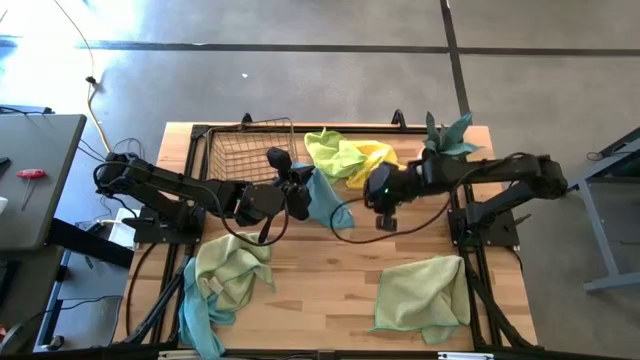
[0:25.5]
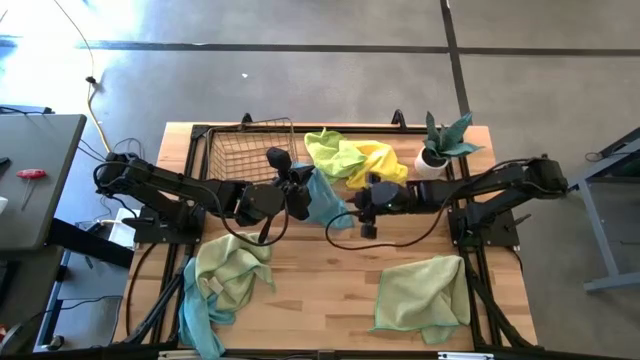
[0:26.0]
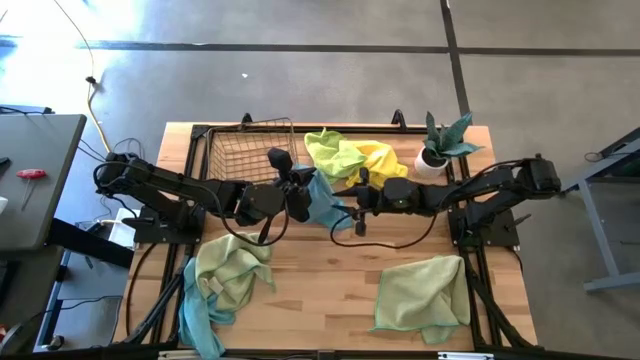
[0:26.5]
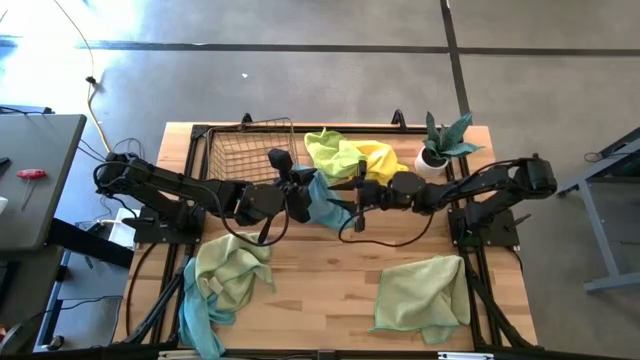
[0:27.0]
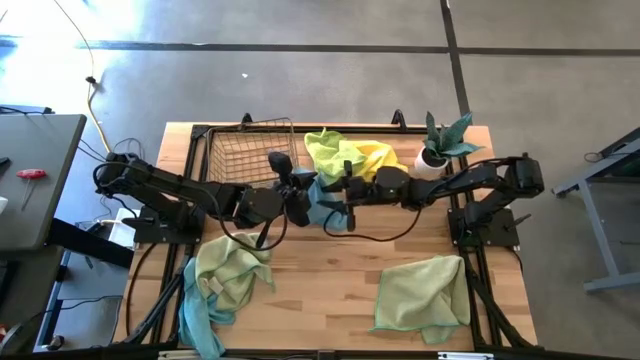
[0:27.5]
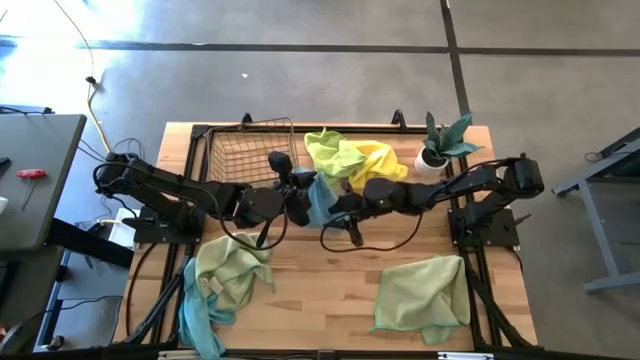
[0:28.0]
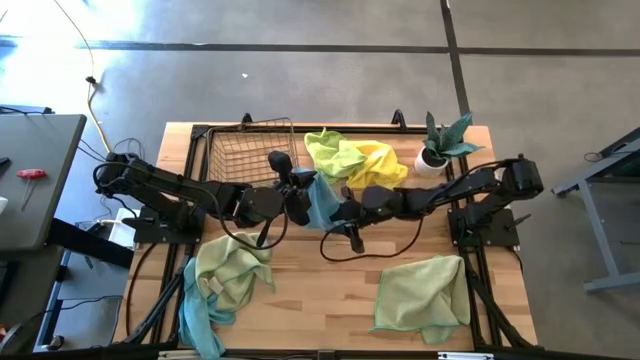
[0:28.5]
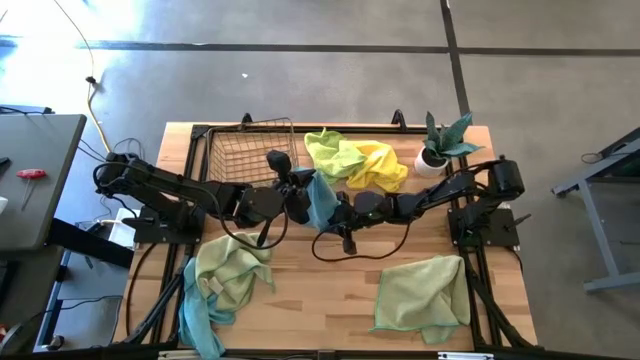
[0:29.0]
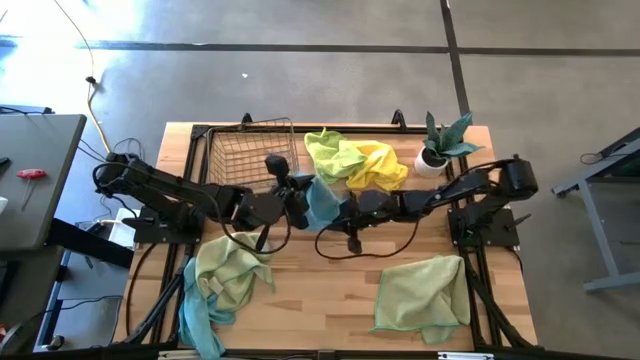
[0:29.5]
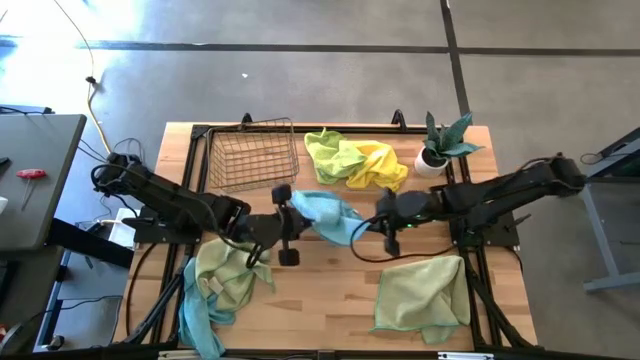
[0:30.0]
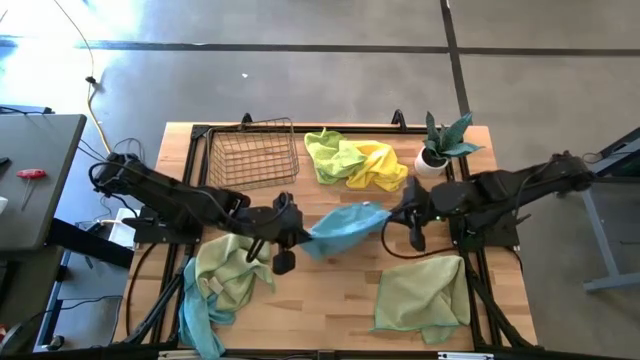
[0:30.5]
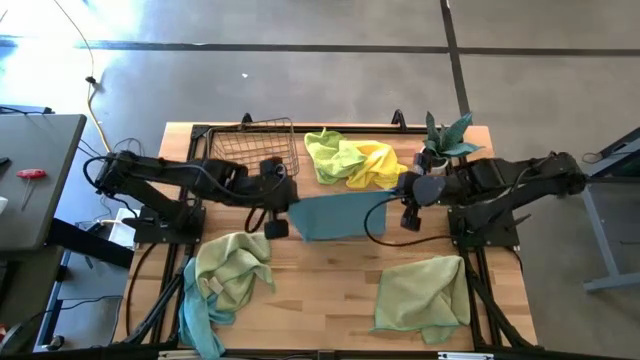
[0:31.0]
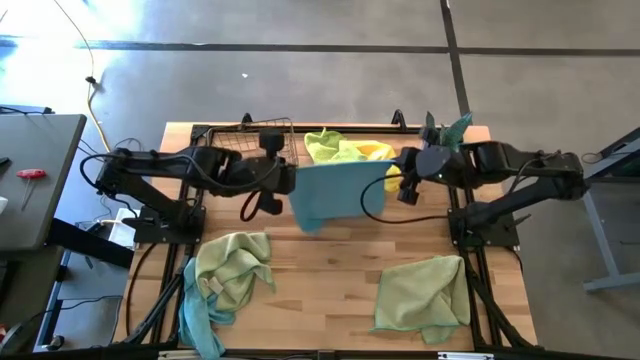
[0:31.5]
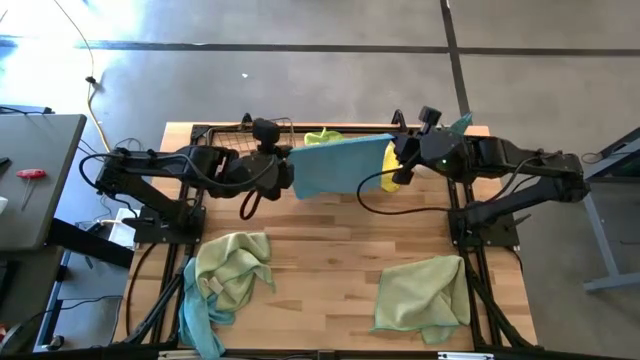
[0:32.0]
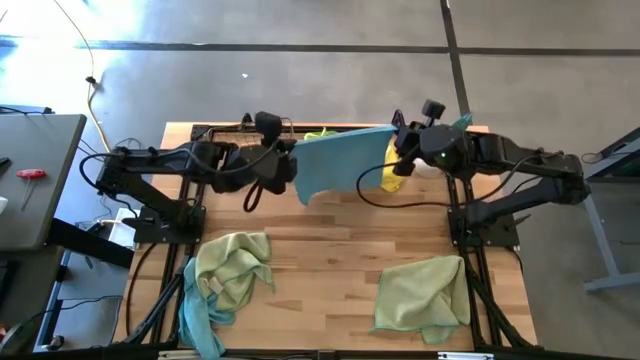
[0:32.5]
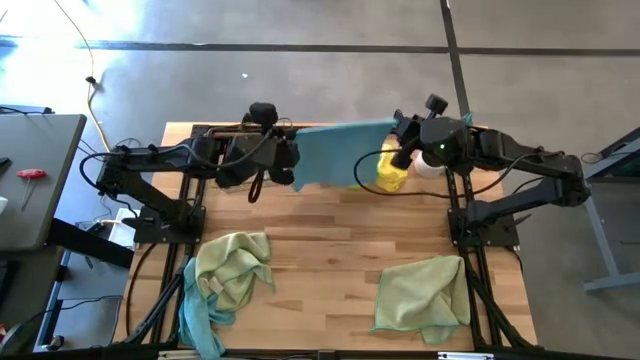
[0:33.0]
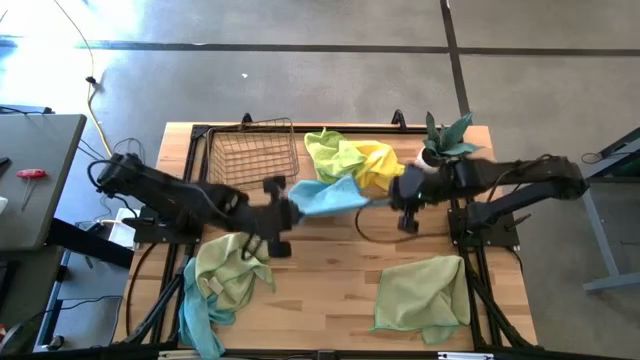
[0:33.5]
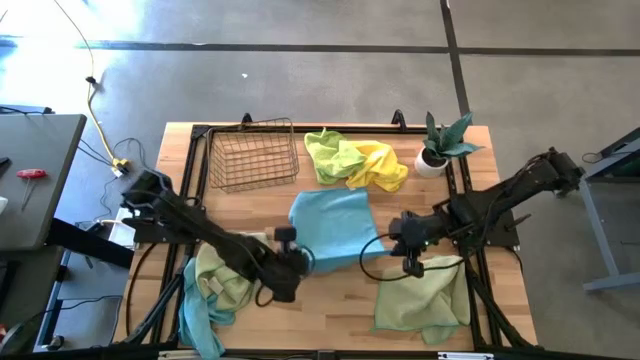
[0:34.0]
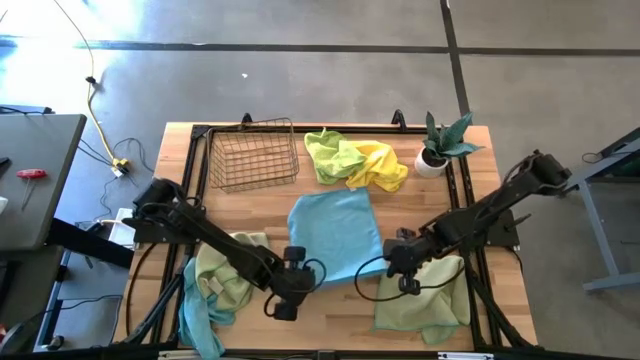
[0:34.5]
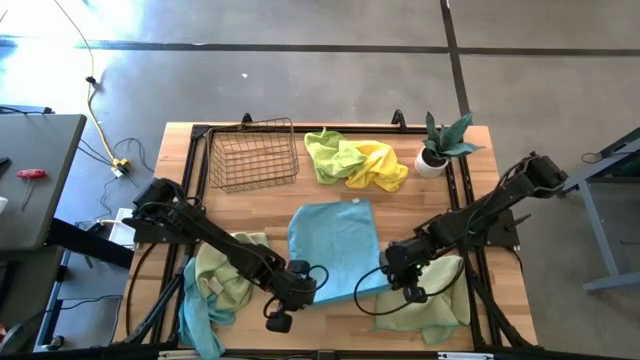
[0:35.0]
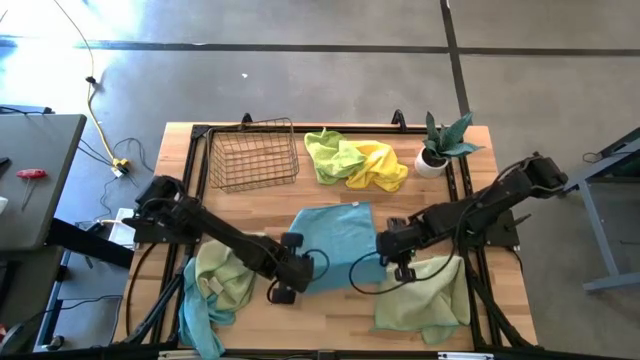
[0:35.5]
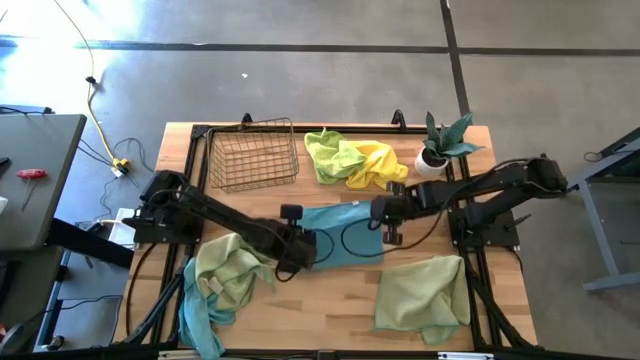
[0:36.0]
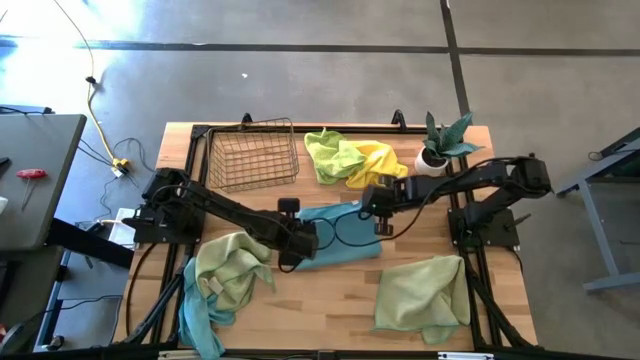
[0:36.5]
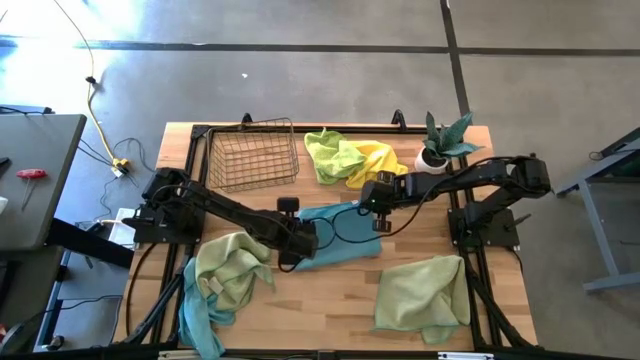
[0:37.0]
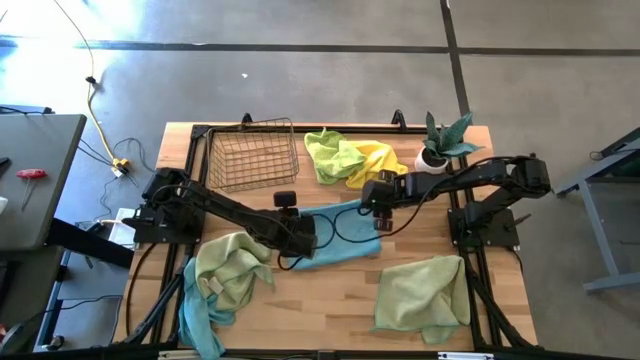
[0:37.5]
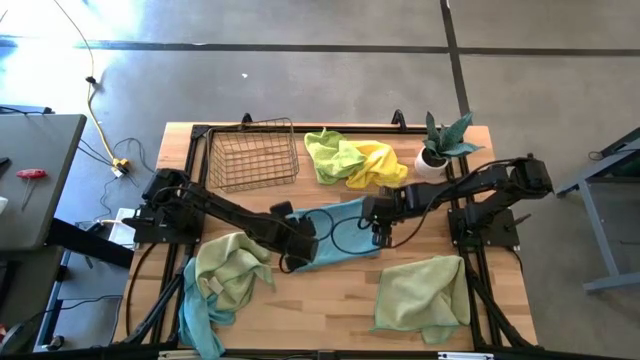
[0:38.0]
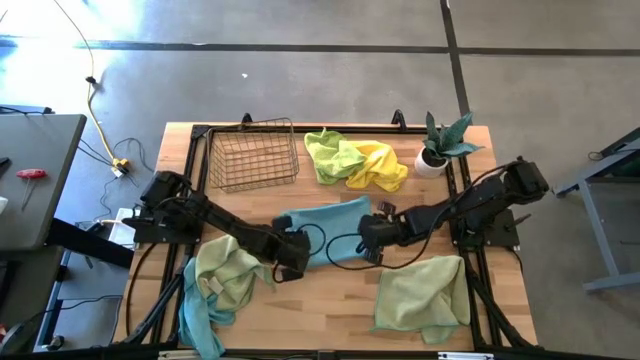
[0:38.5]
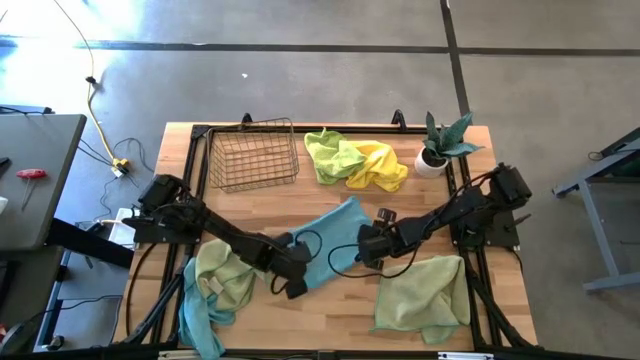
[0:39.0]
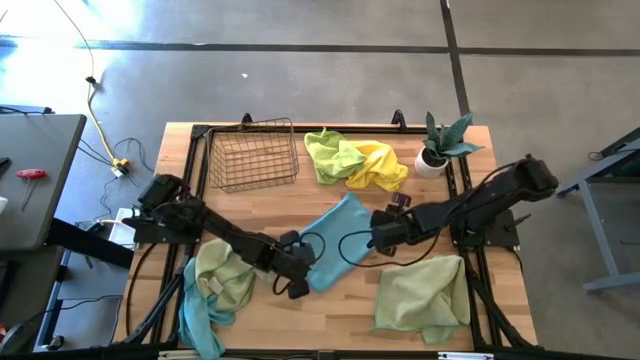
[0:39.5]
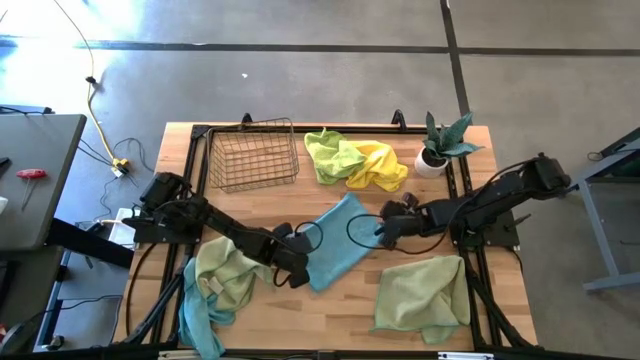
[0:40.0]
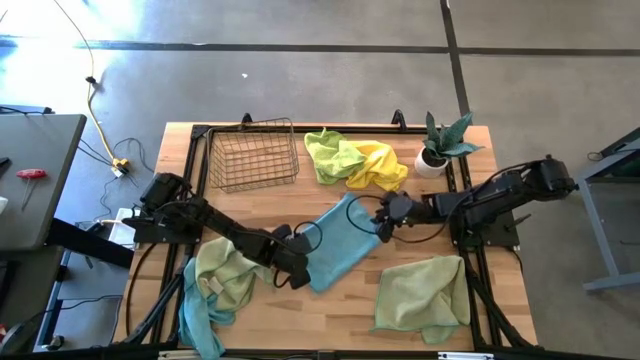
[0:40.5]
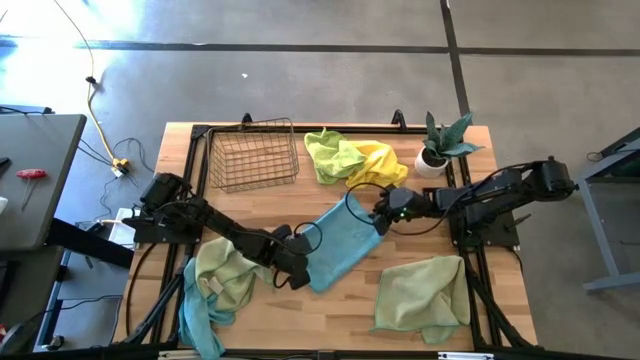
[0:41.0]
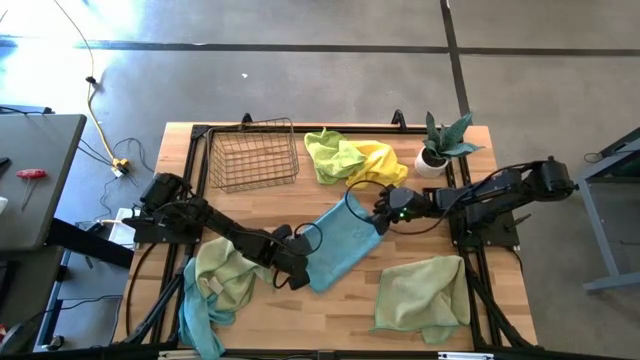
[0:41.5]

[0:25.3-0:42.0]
Task: Fold microfiber towels
Fold the right blue towel

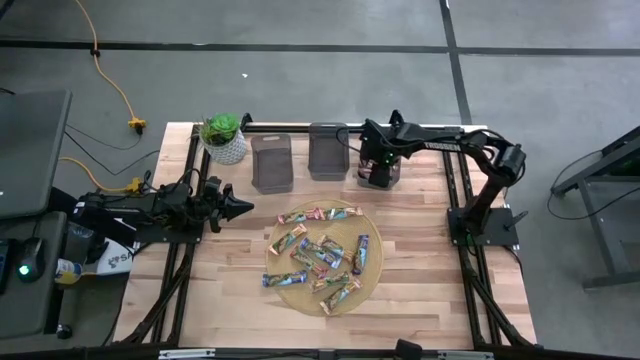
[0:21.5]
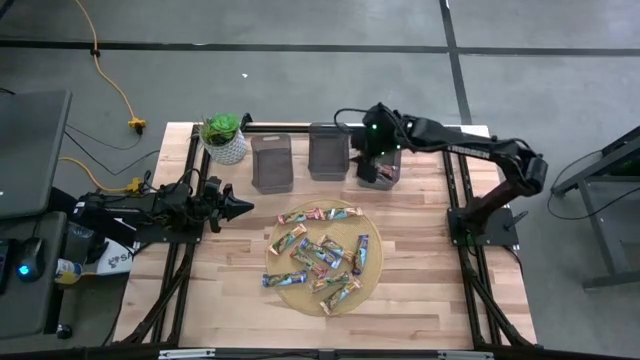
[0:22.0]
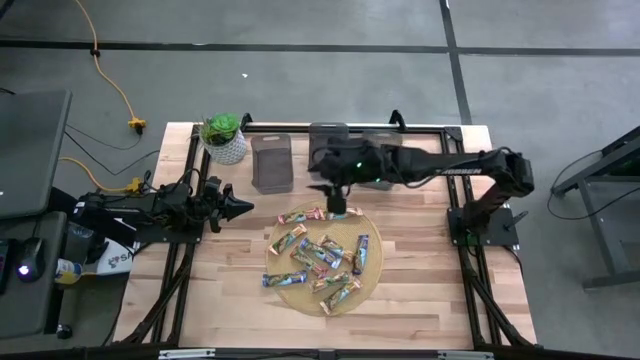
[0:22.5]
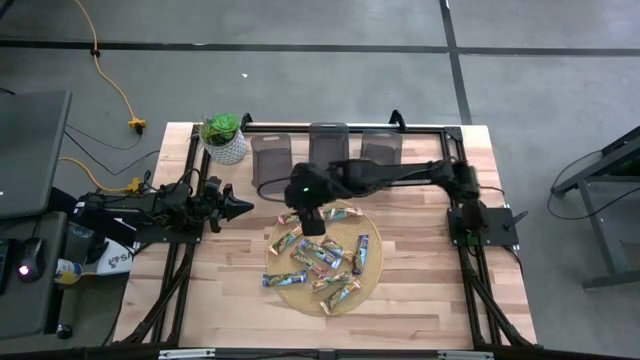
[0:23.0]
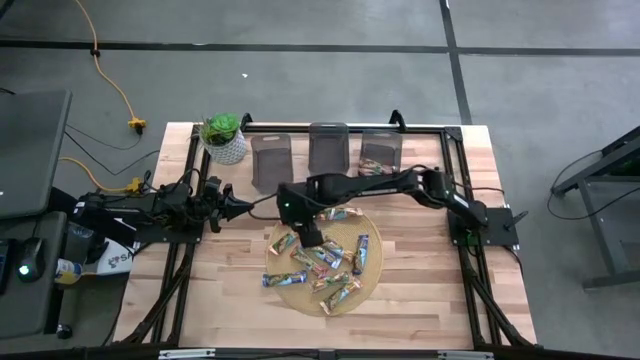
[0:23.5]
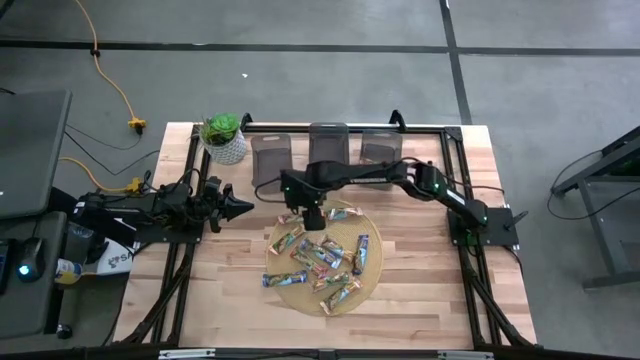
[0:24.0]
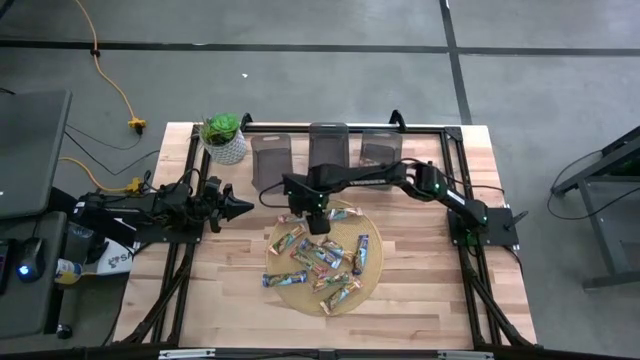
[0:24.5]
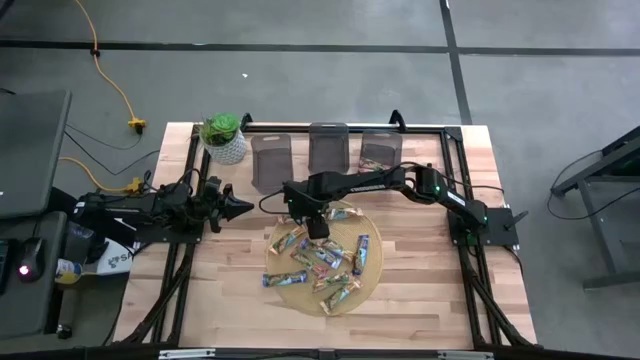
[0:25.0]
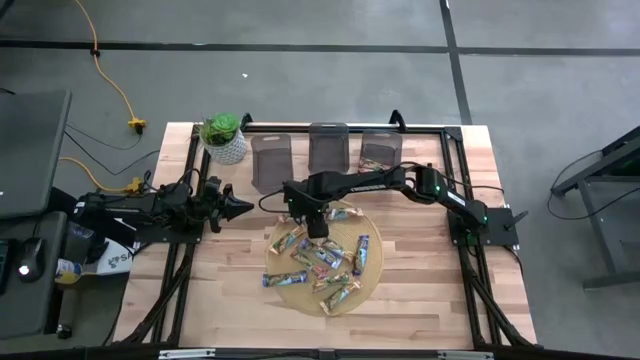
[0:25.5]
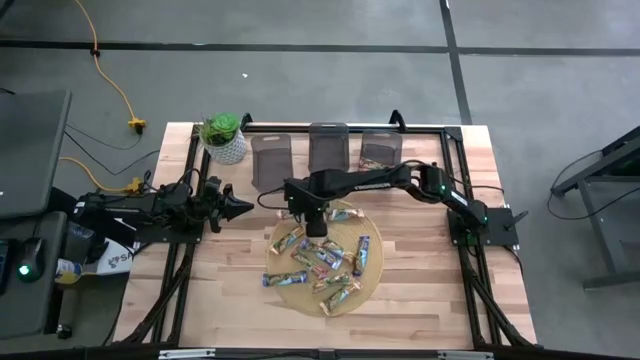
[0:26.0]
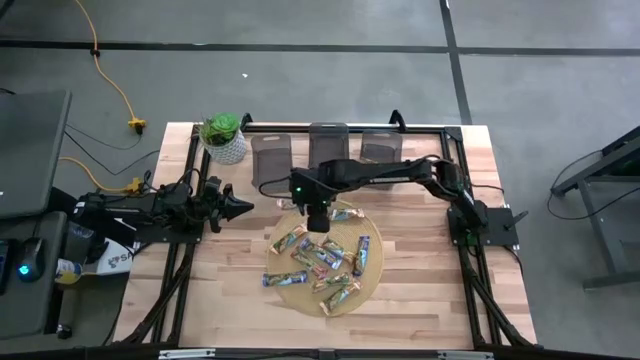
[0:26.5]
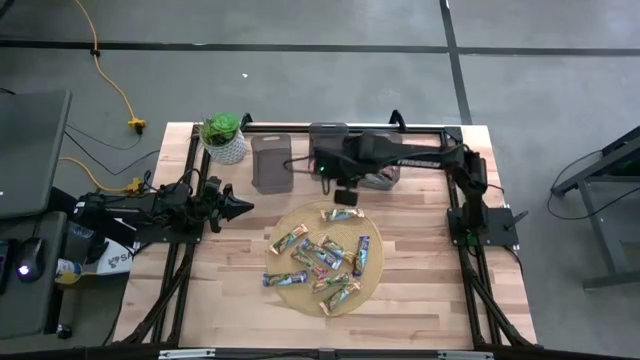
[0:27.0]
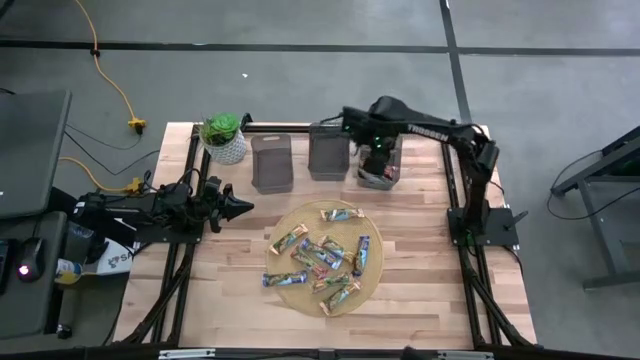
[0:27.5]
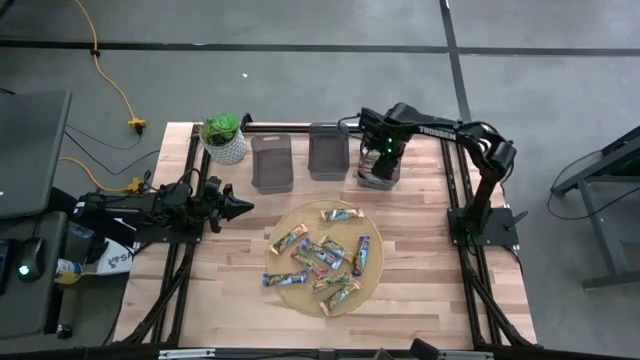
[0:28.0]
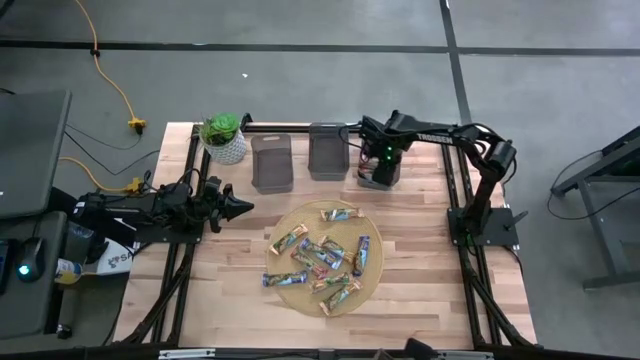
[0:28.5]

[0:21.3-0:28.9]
Task: Pick and place Granola Bars by type
Put the orange granola bar into the right black bin
